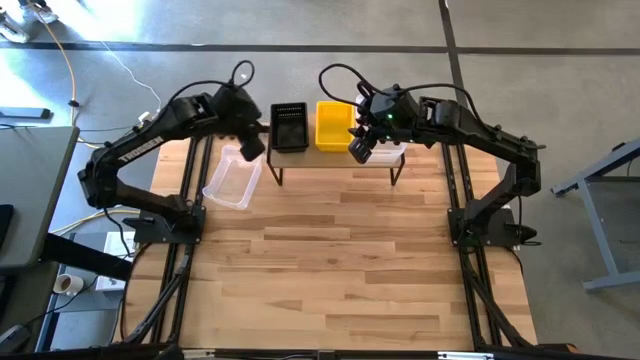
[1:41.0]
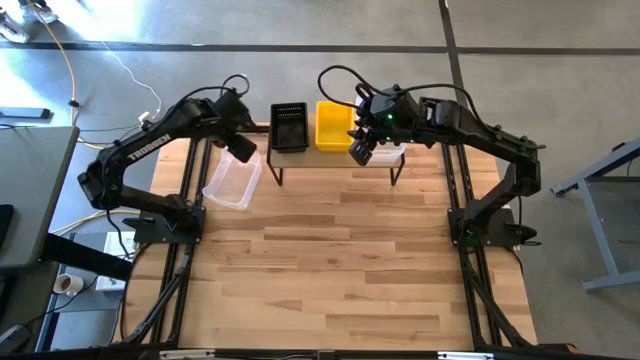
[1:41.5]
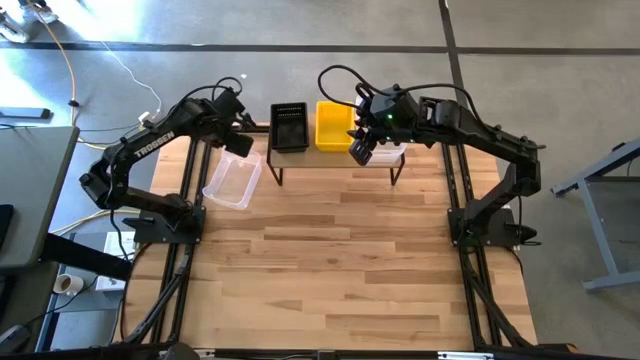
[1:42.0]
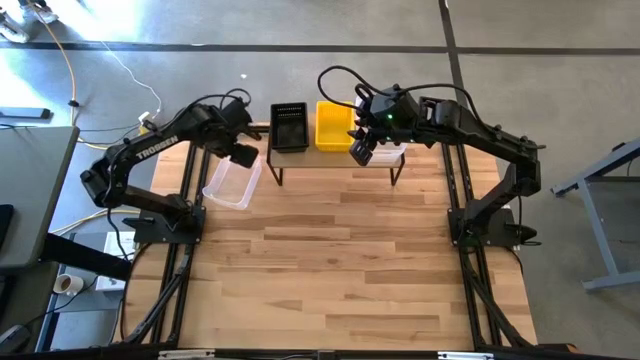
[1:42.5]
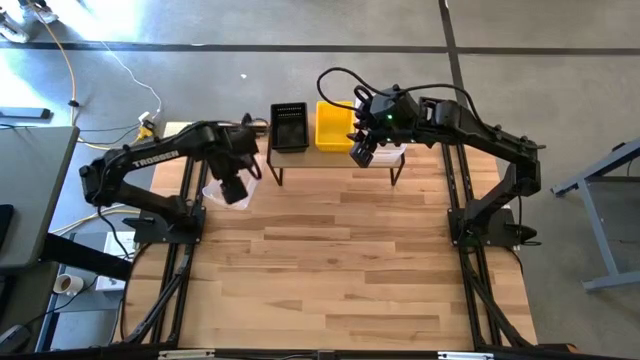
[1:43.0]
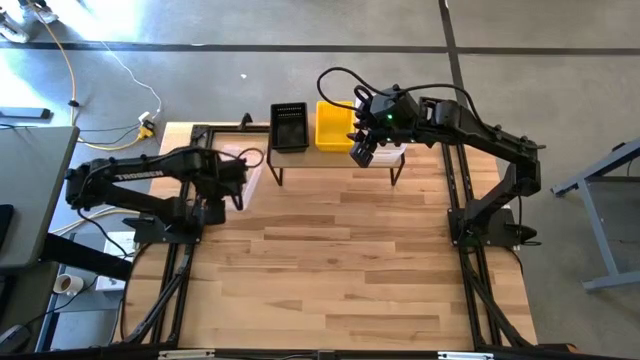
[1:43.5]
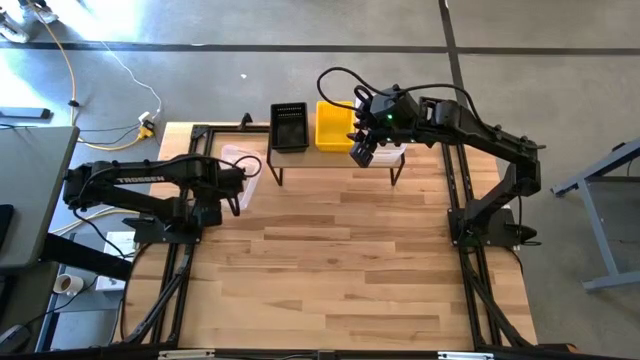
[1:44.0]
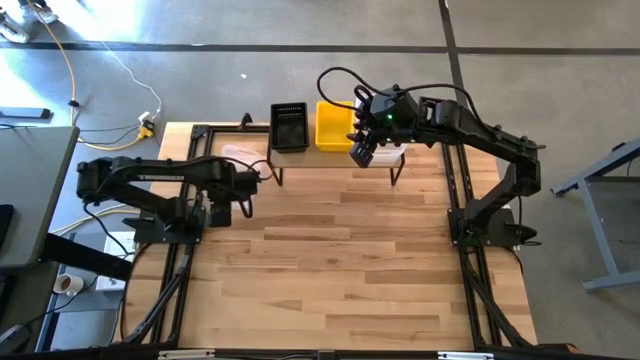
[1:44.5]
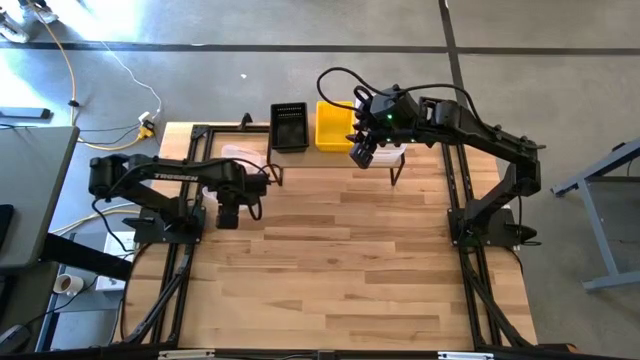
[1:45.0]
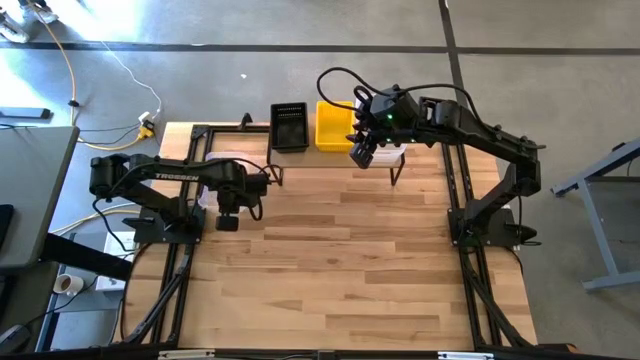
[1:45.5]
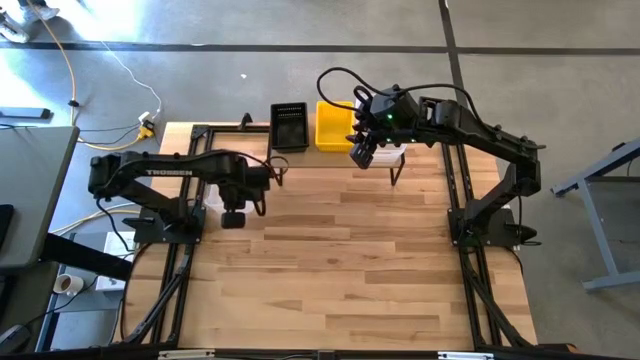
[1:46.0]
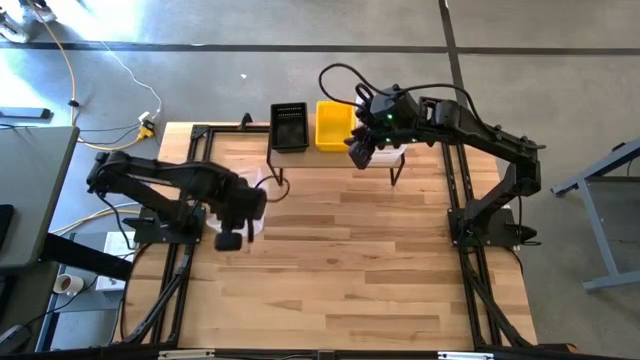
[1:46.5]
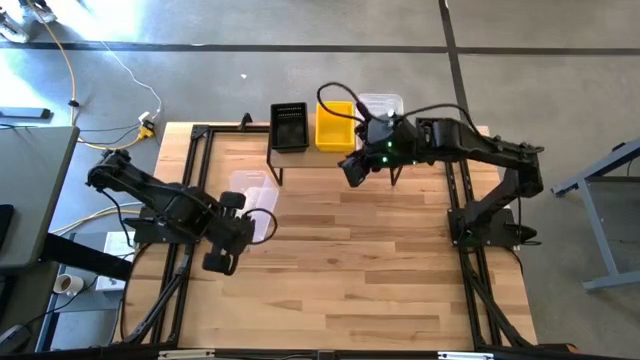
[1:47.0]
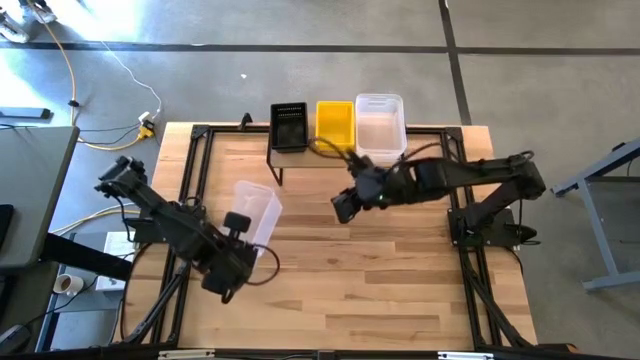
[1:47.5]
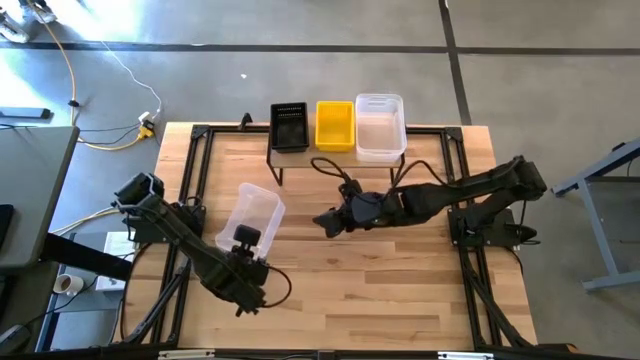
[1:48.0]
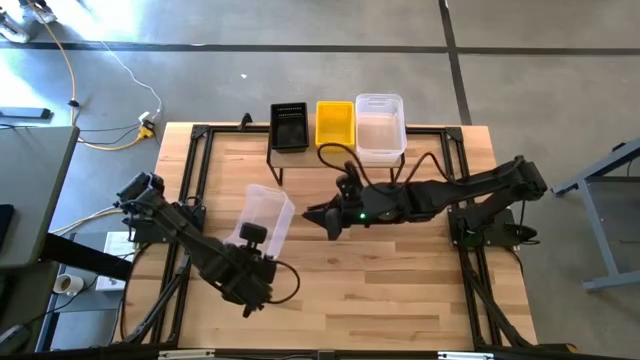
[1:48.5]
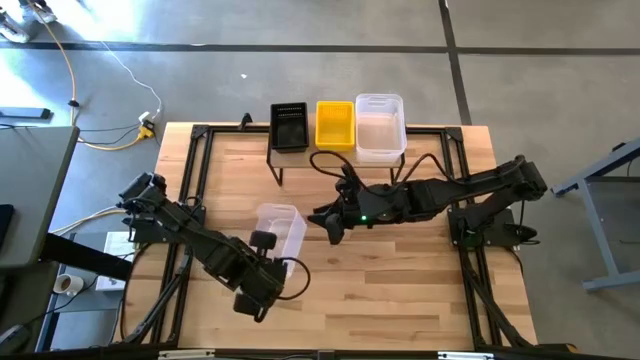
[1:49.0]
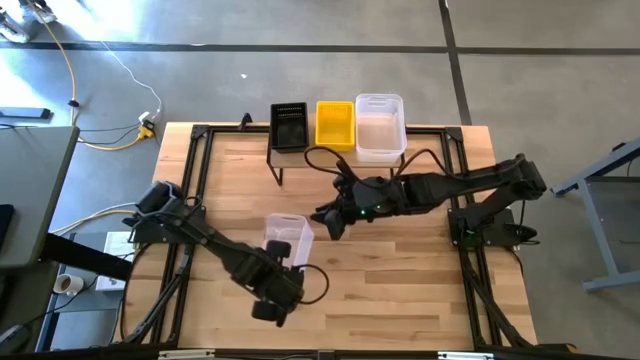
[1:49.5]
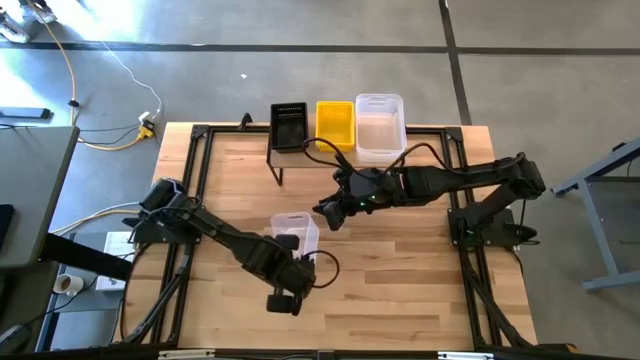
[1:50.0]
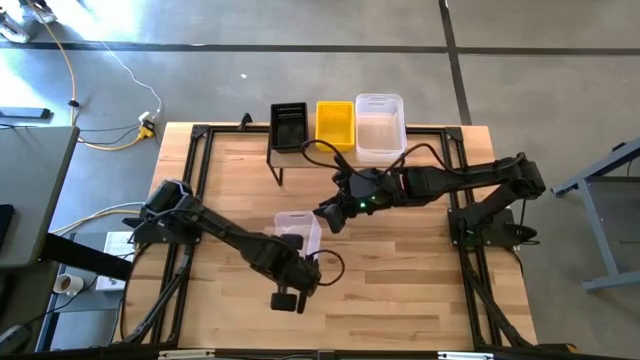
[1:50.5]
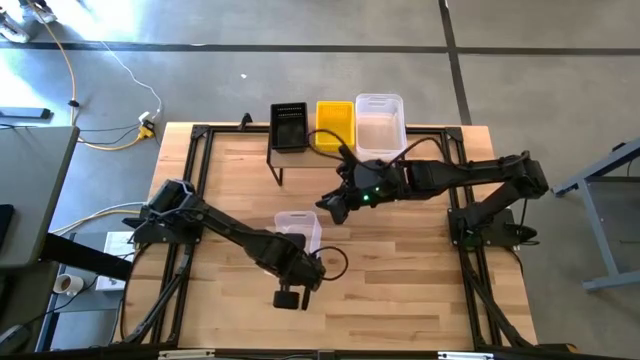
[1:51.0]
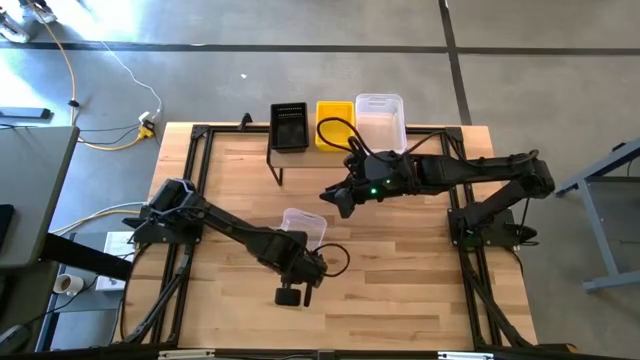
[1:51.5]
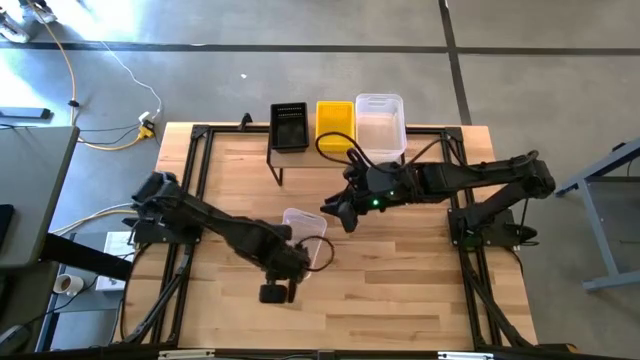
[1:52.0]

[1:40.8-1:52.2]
Task: Stack baskets on shelf by color
Move the transparent bin to the center of the table

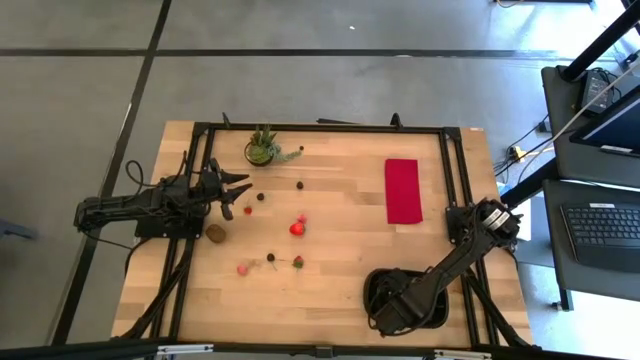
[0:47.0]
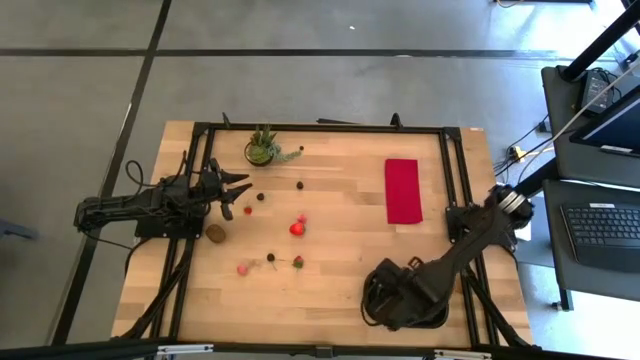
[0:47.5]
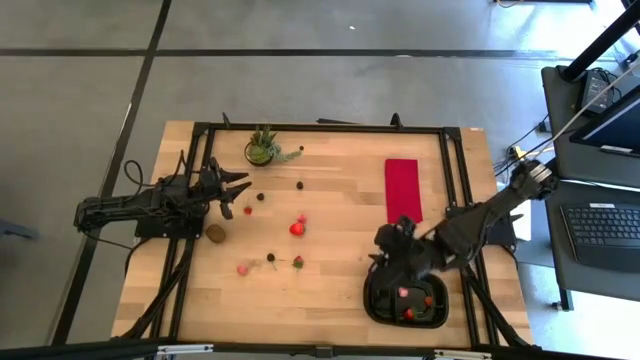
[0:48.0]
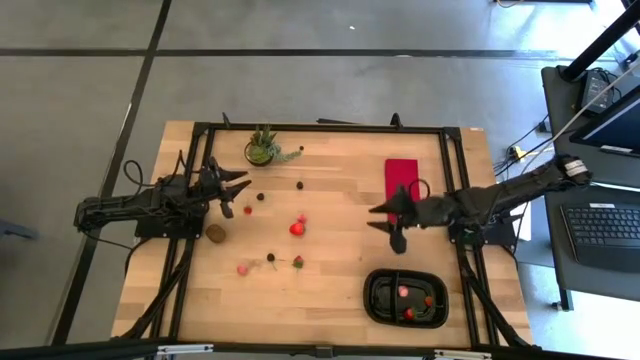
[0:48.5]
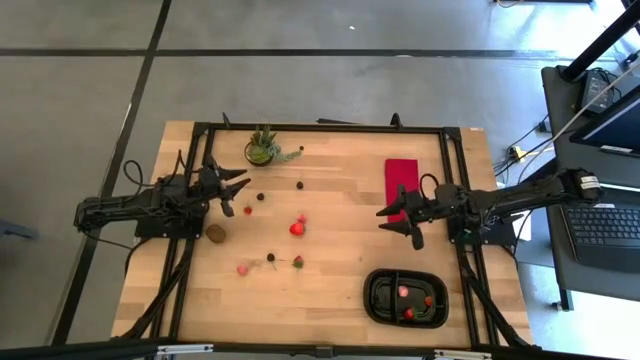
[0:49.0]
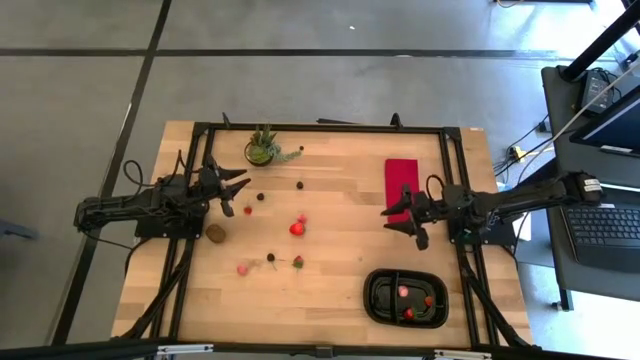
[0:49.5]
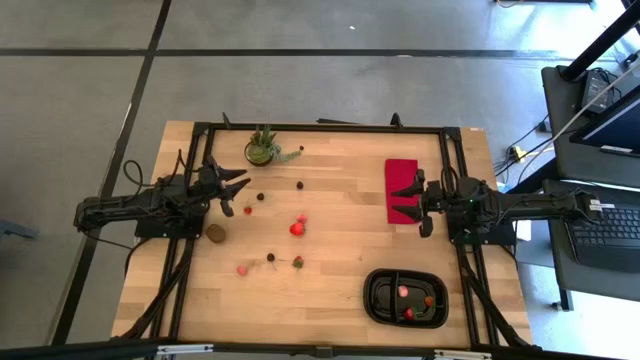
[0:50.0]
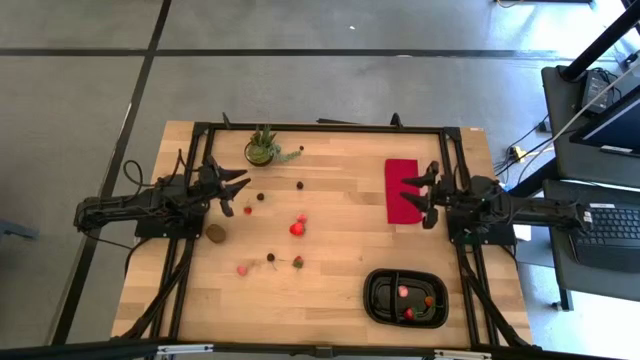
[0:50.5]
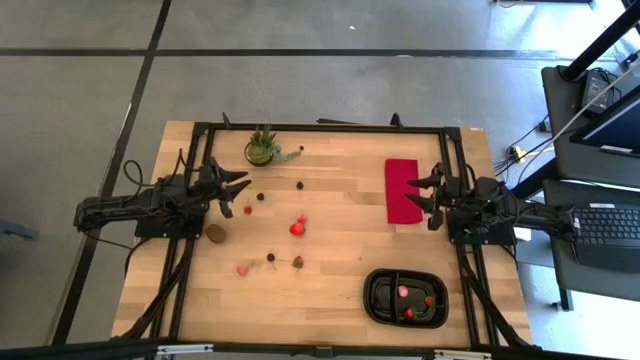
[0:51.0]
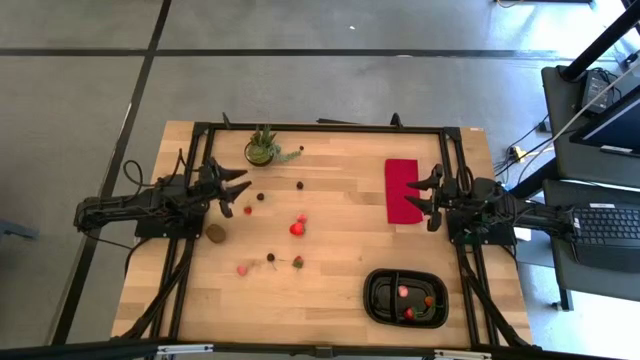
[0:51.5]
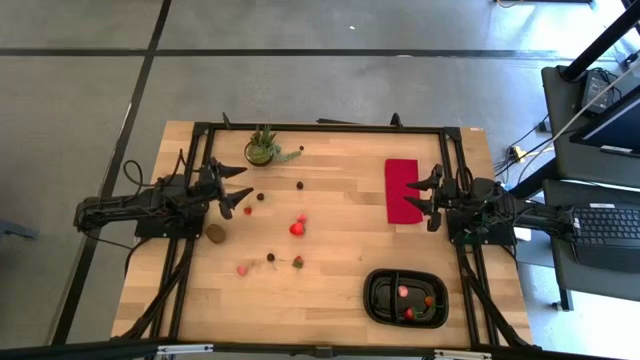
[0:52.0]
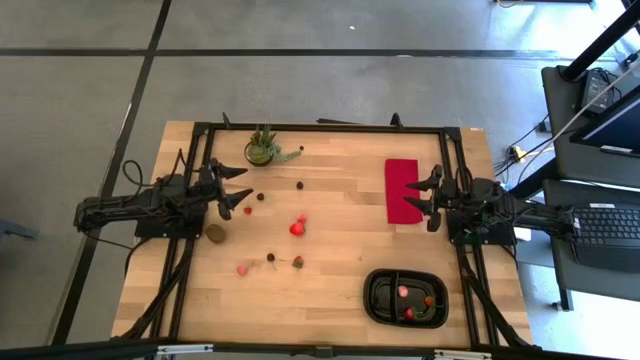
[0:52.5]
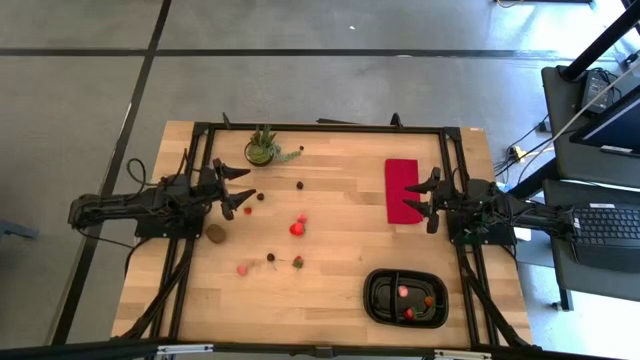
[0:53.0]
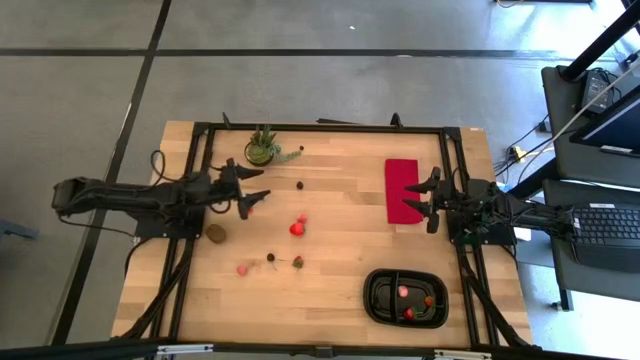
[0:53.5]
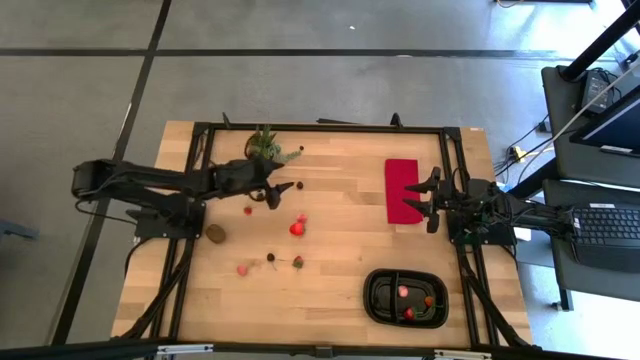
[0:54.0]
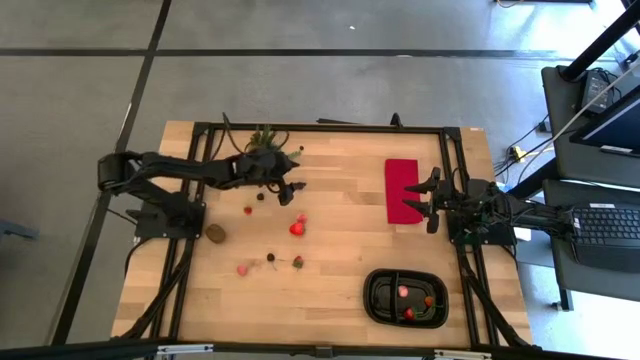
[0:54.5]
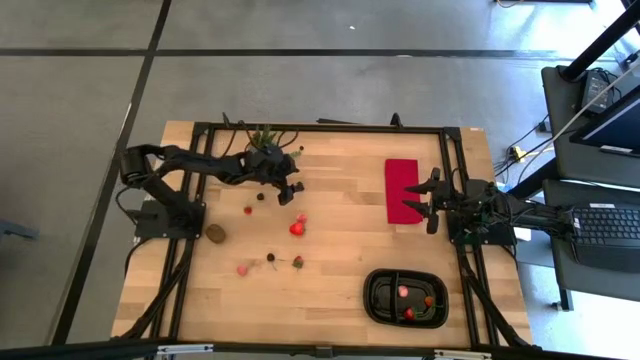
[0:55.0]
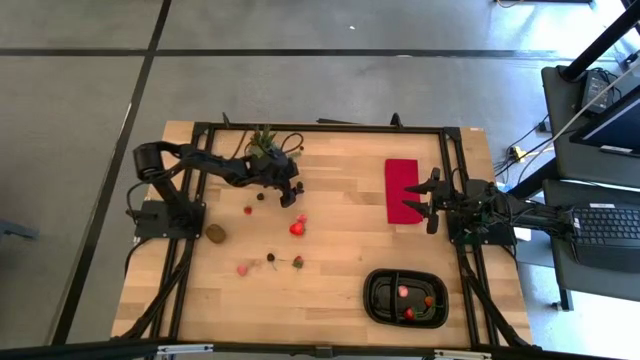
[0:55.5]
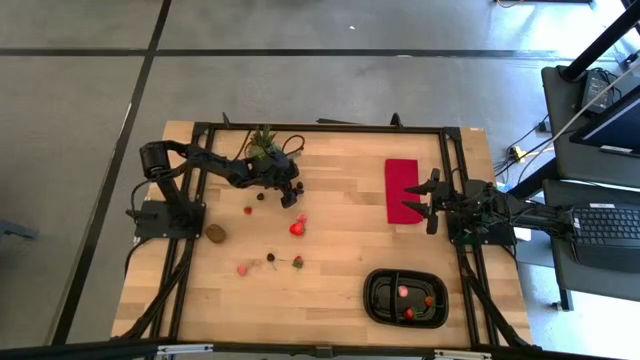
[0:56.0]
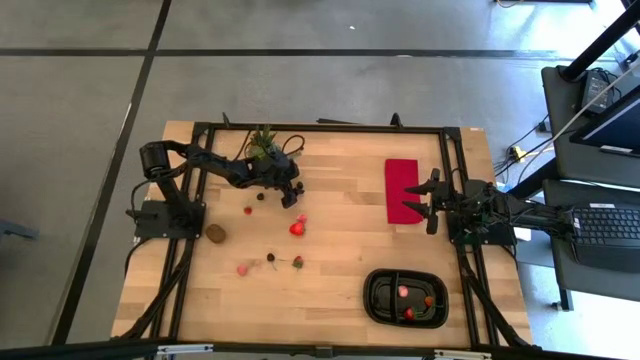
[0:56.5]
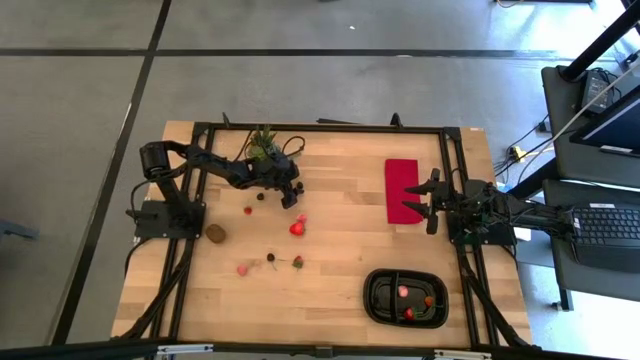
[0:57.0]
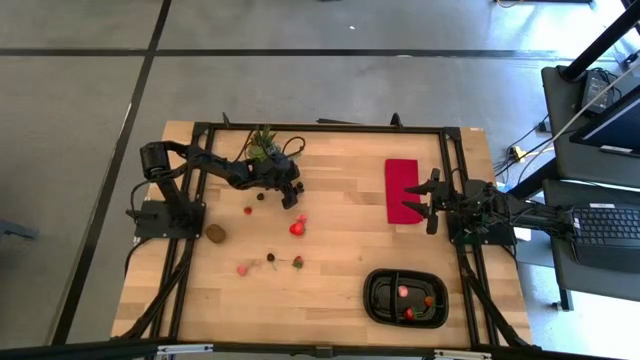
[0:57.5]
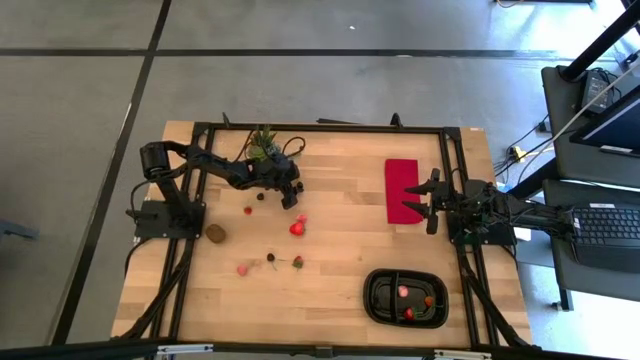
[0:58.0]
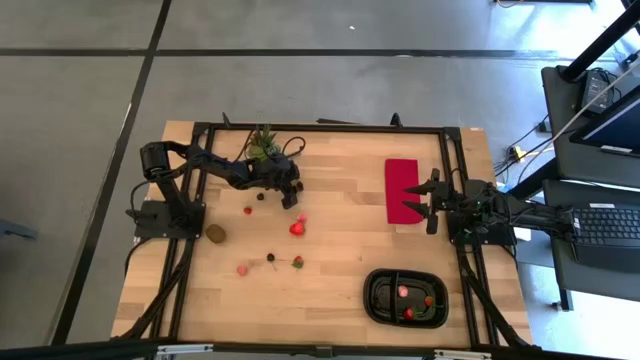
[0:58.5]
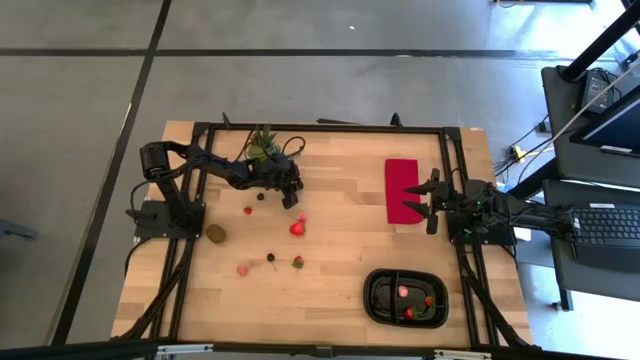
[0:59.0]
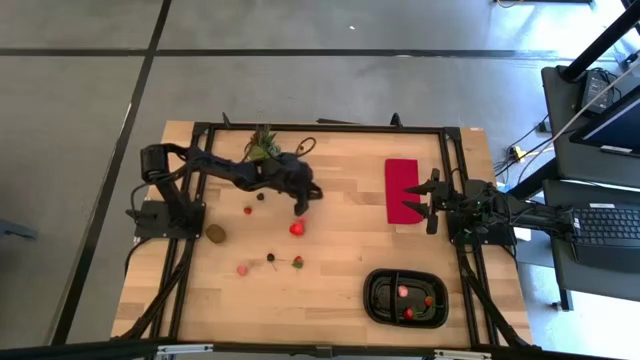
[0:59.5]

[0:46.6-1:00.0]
Task: Pick and placing Produce into tupperware
Put the blackberry into the left of the black bin
